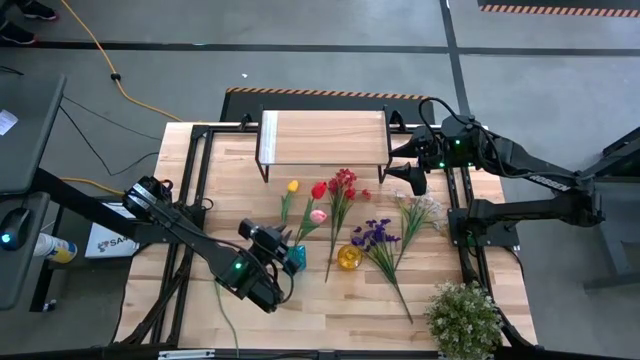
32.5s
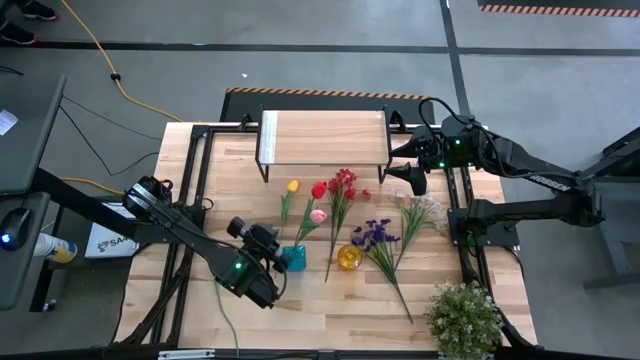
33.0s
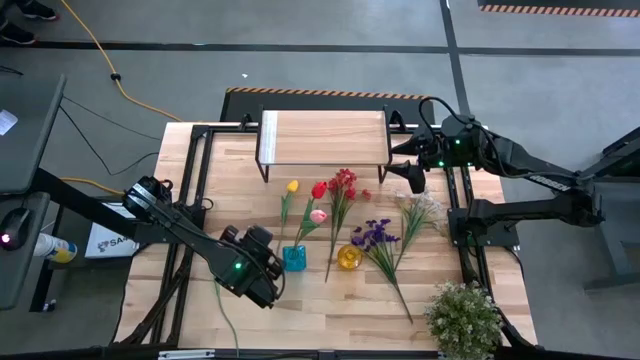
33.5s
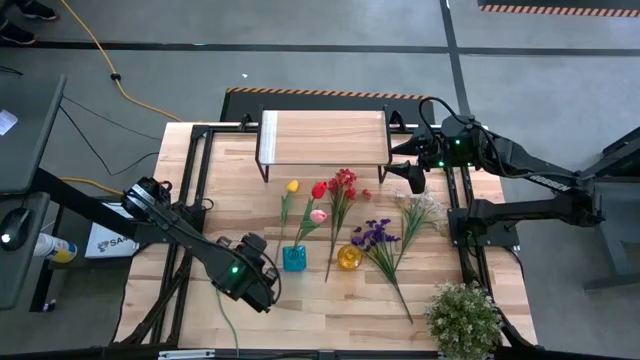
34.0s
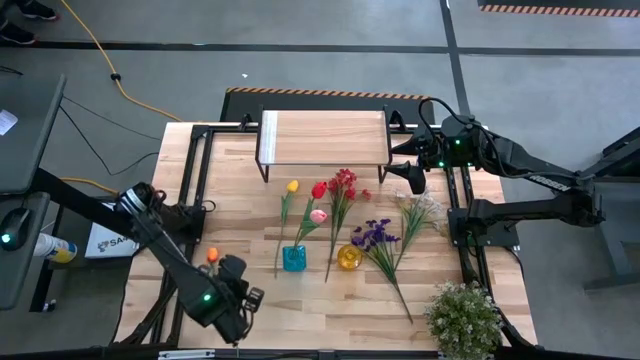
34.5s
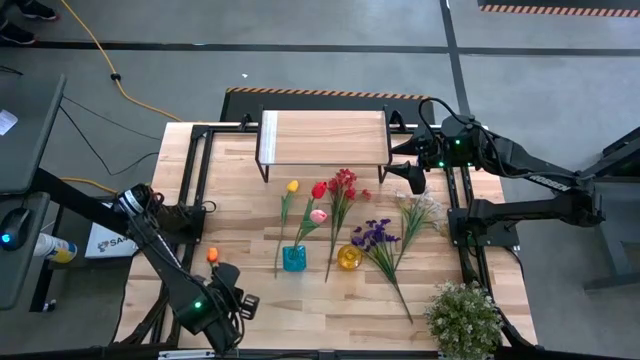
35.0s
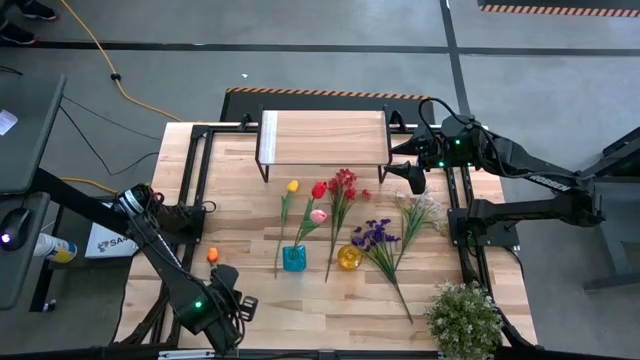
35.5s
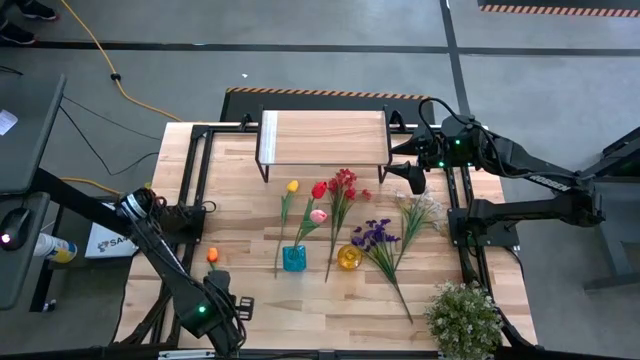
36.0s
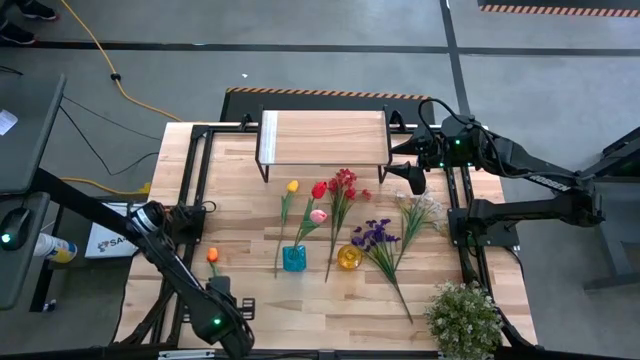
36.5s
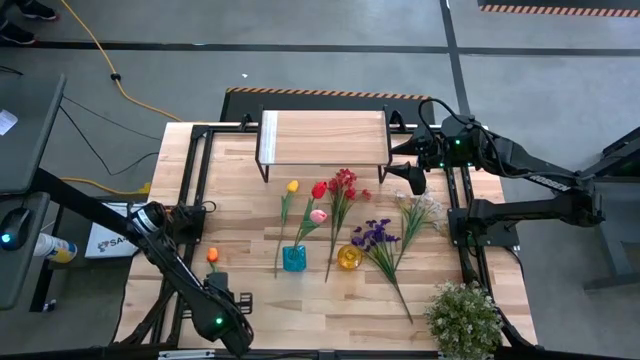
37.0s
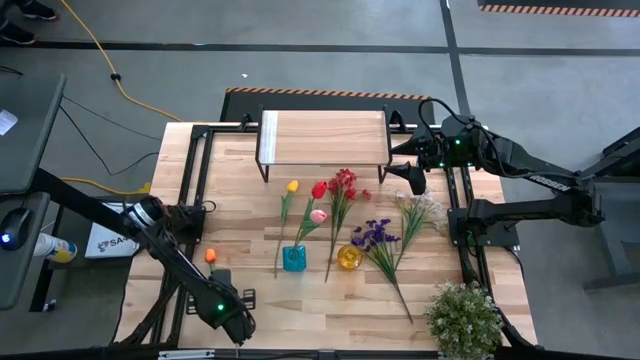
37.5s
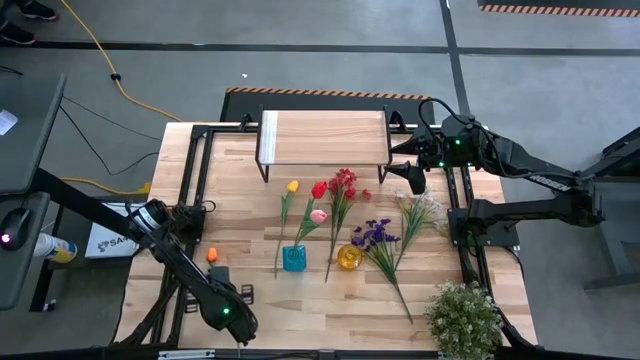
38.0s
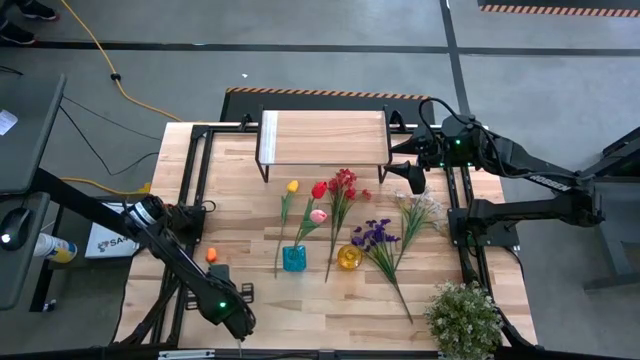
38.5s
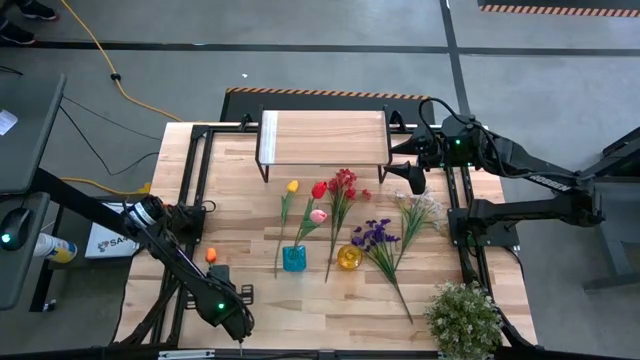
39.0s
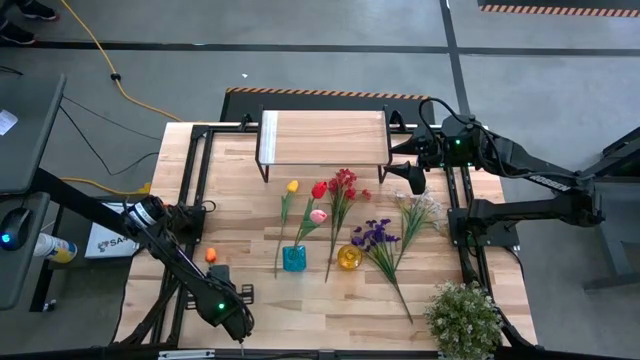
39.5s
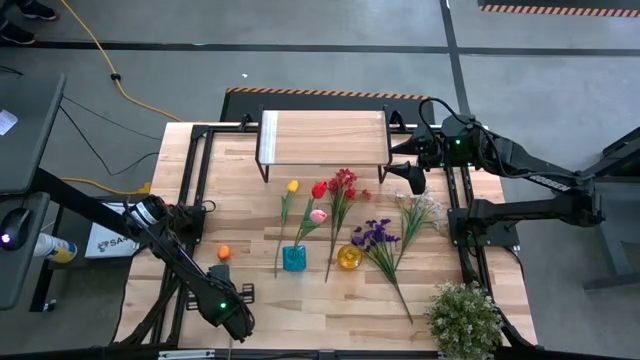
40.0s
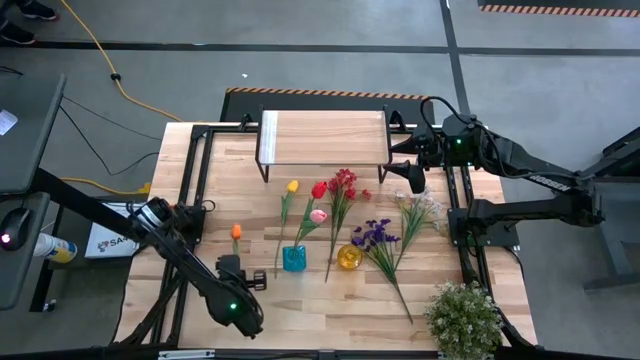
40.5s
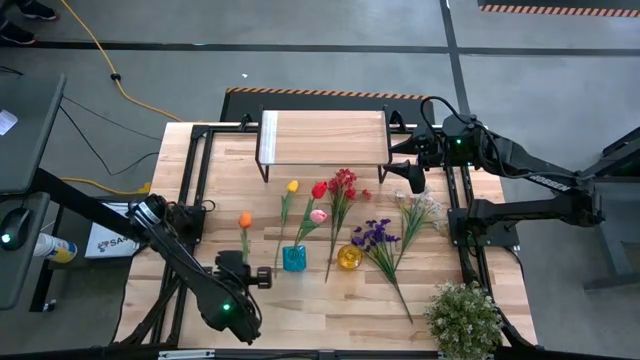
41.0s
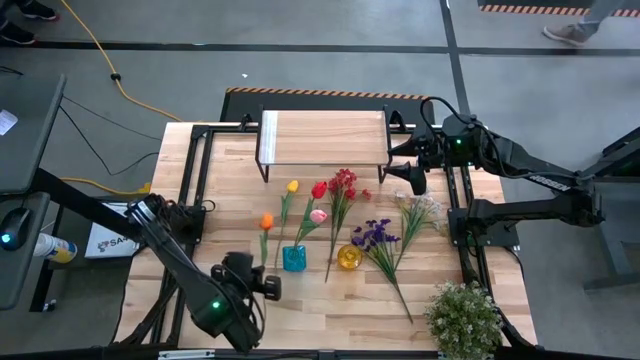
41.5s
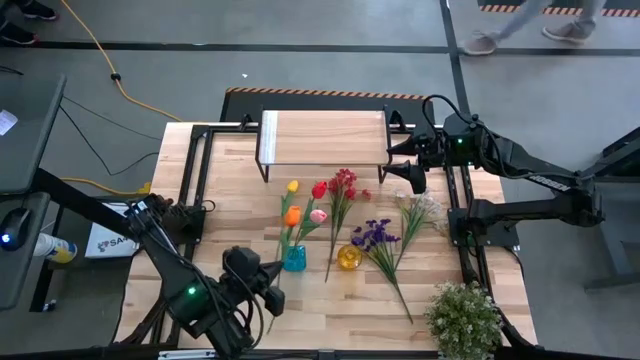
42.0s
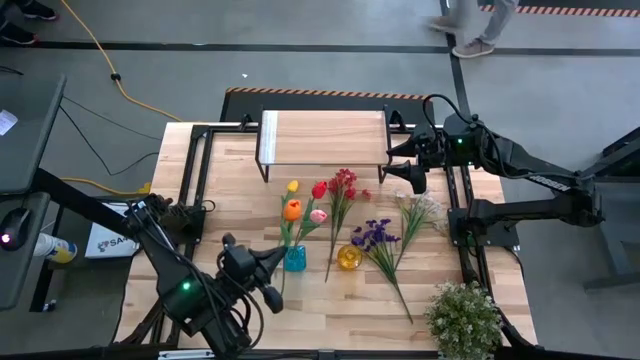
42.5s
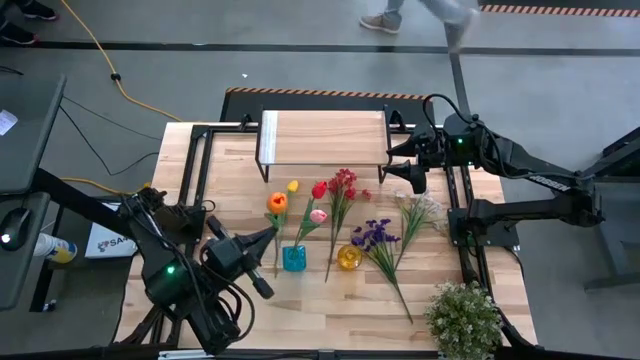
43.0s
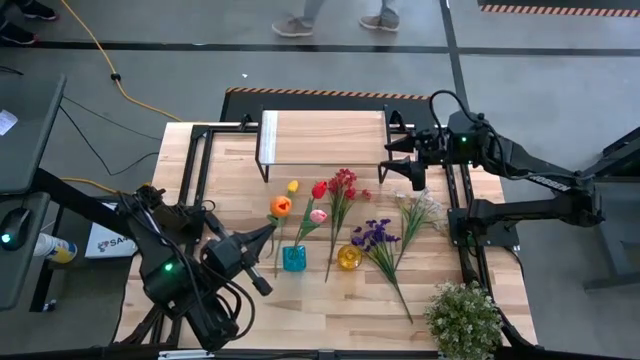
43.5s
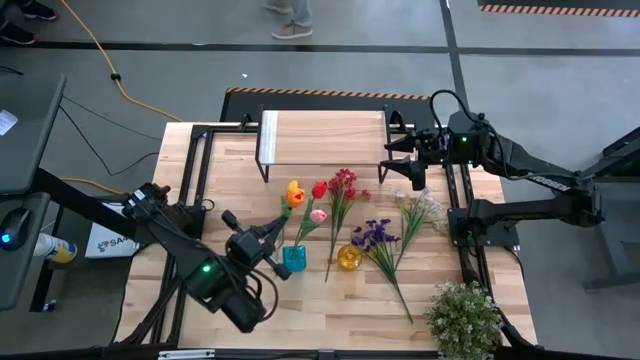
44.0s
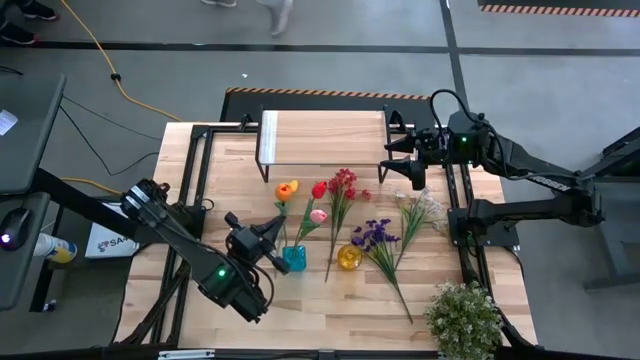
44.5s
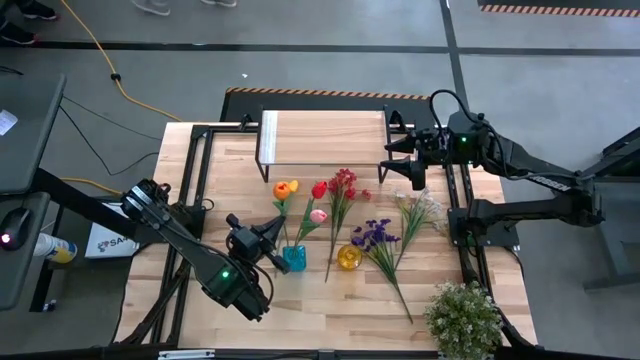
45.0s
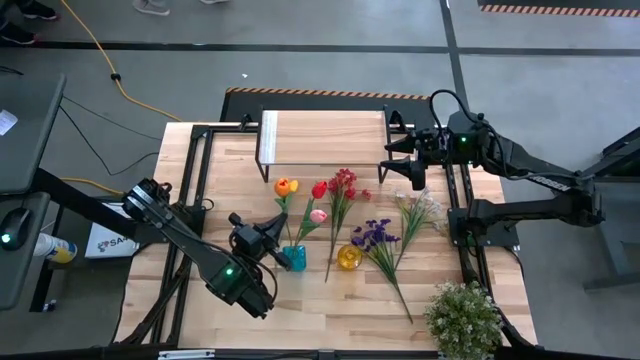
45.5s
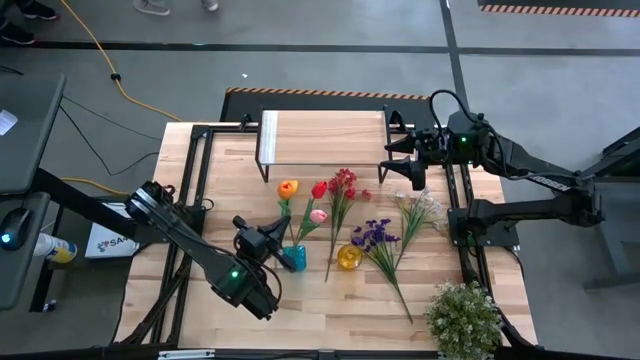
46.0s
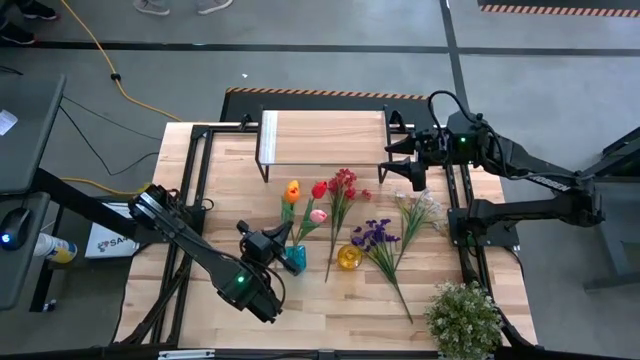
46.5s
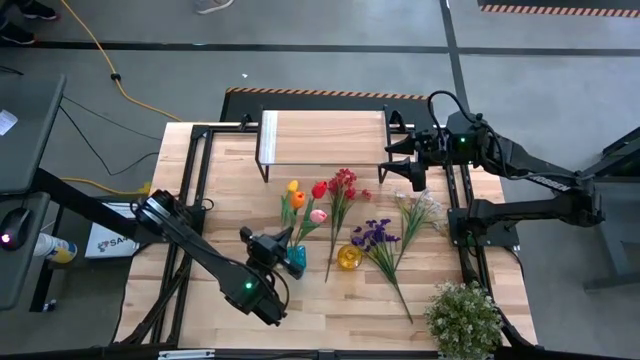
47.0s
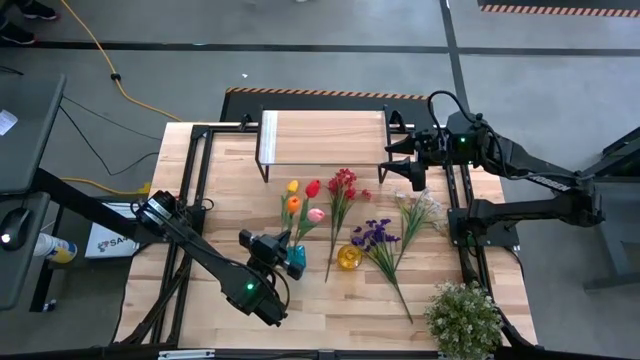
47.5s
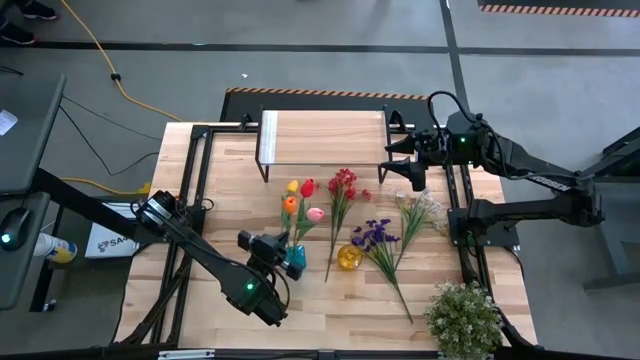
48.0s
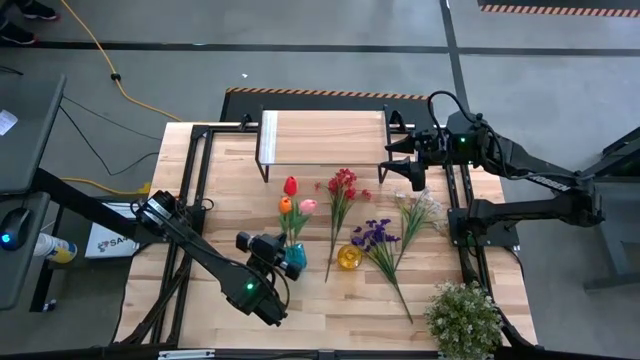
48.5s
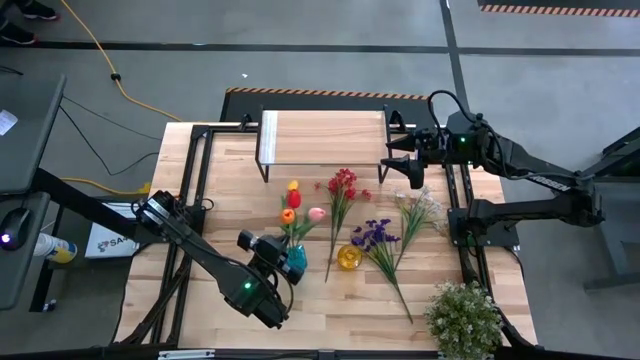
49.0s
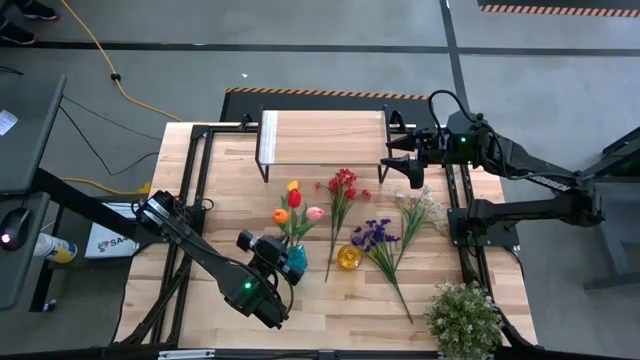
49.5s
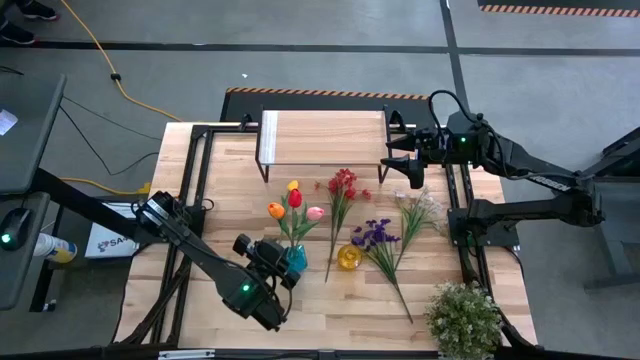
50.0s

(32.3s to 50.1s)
Task: Pick and place flowers into a vace then onto a shelf
Put the orange tulip into the blue vase

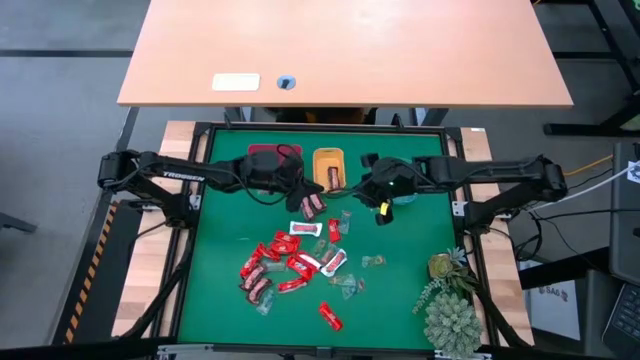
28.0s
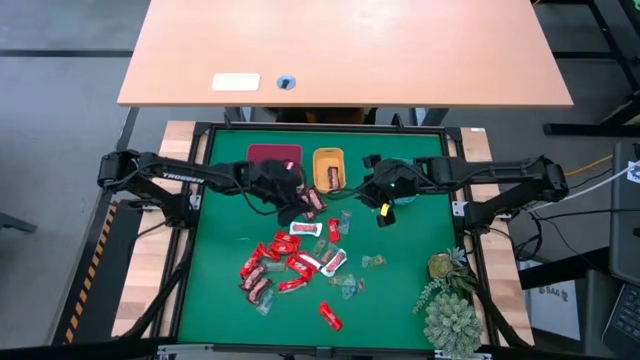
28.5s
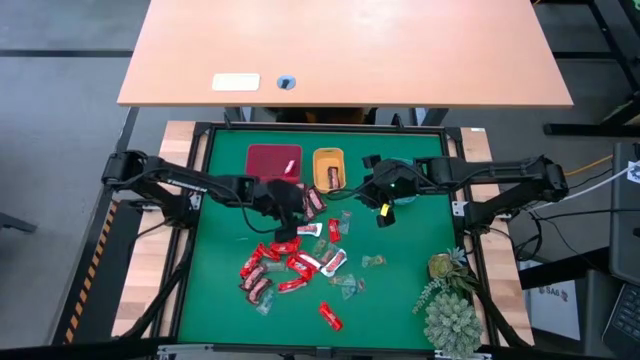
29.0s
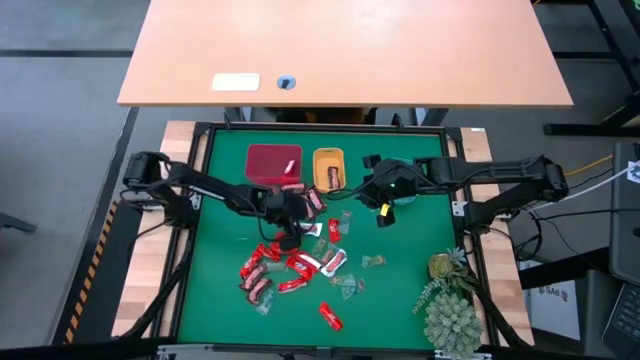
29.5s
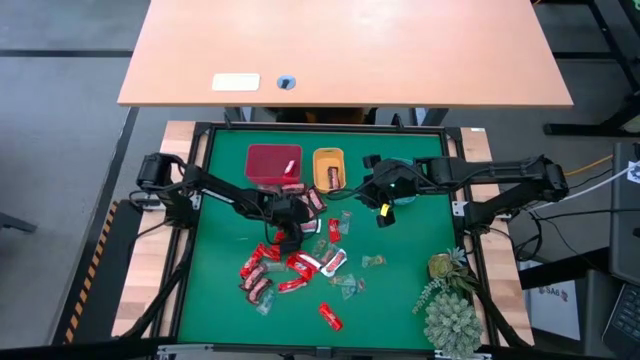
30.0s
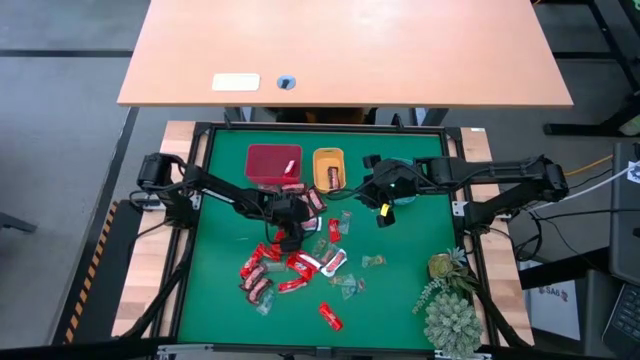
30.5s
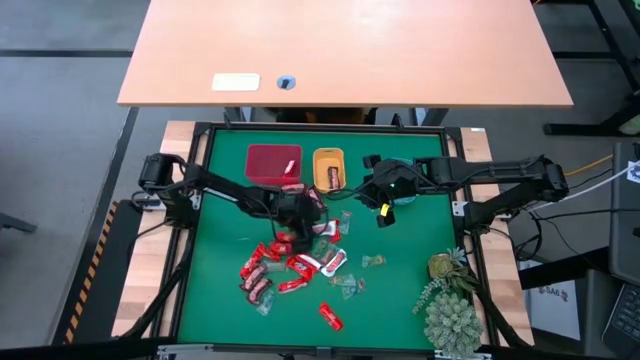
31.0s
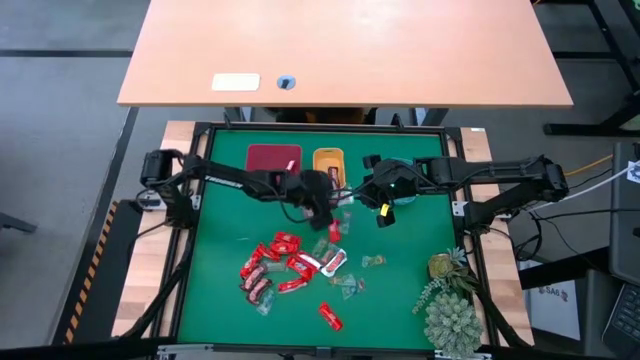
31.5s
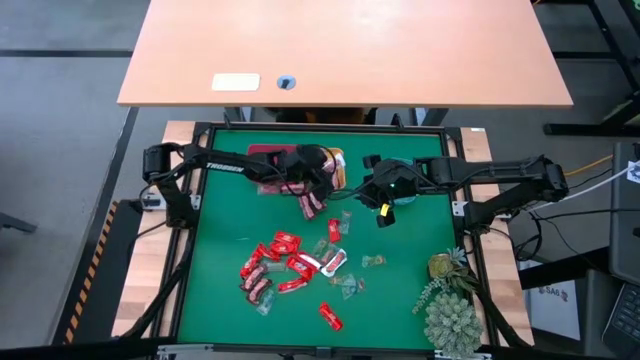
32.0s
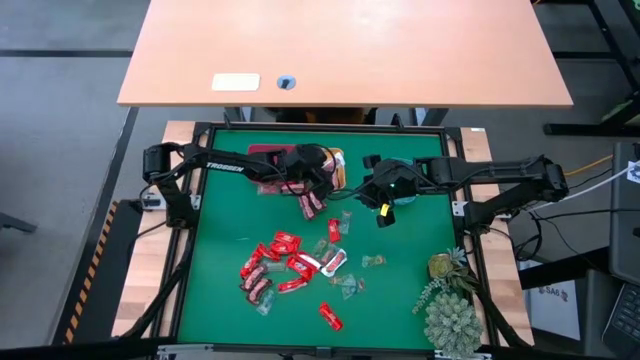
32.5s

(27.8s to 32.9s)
Task: Sort candy
Put the white chocolate bar into the yellow bin
